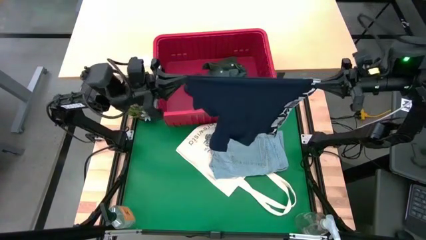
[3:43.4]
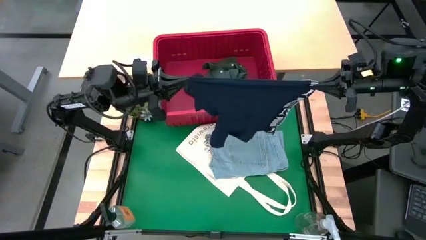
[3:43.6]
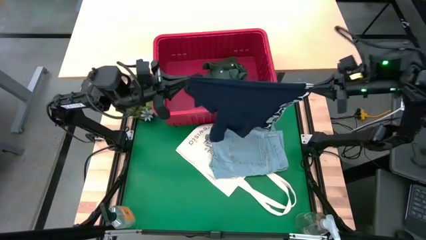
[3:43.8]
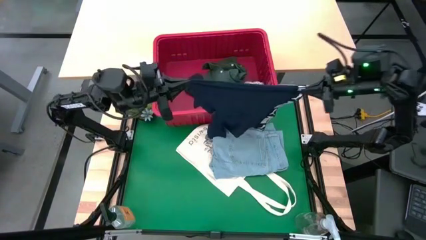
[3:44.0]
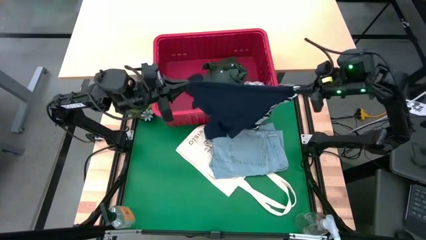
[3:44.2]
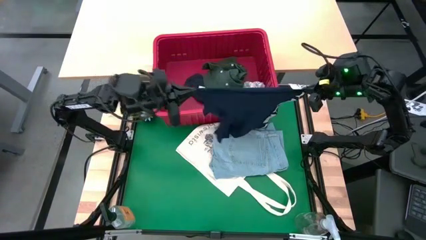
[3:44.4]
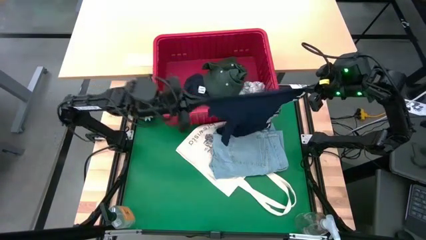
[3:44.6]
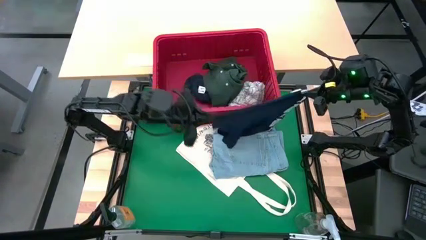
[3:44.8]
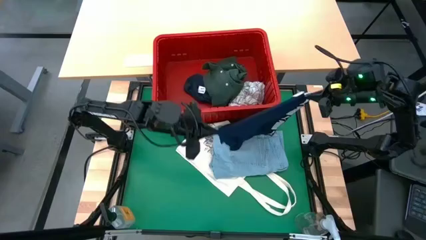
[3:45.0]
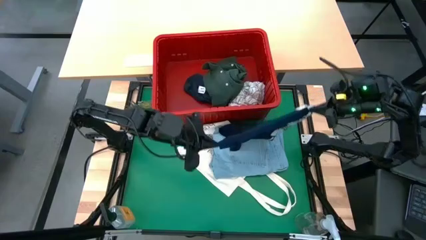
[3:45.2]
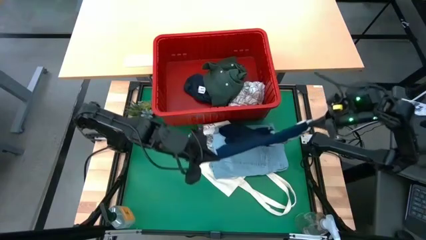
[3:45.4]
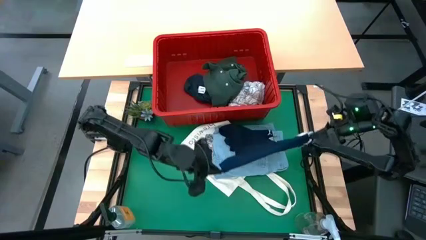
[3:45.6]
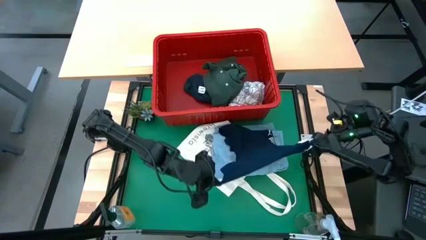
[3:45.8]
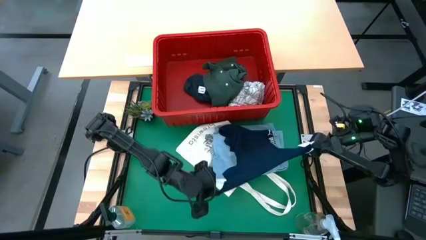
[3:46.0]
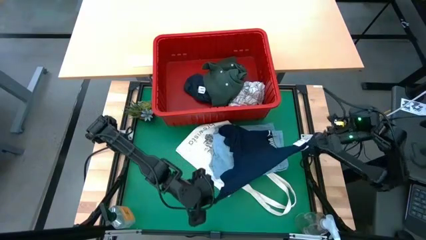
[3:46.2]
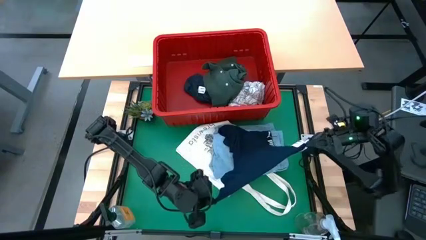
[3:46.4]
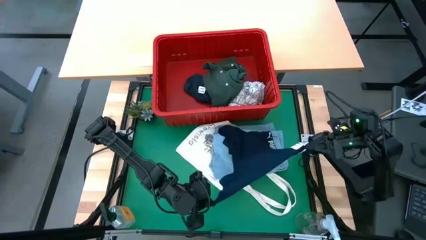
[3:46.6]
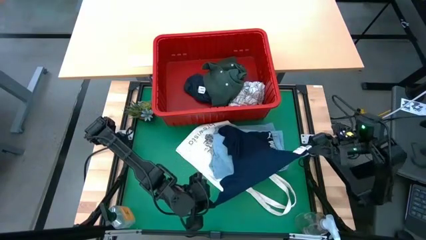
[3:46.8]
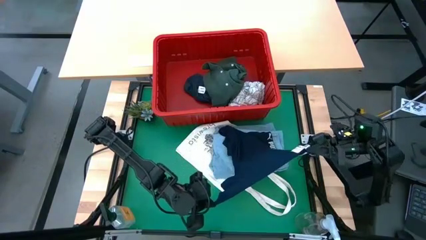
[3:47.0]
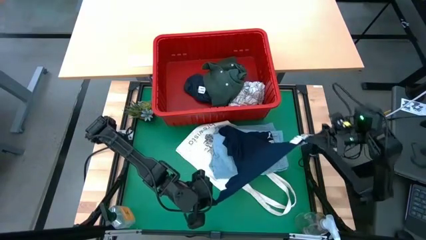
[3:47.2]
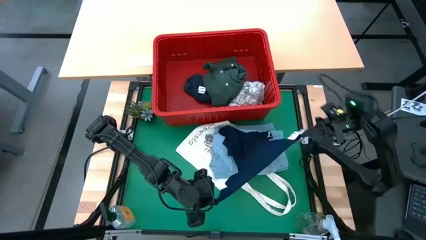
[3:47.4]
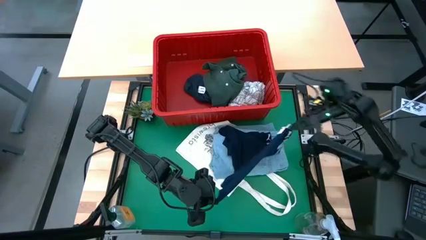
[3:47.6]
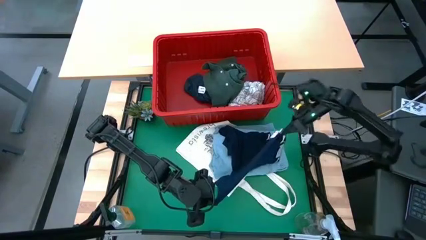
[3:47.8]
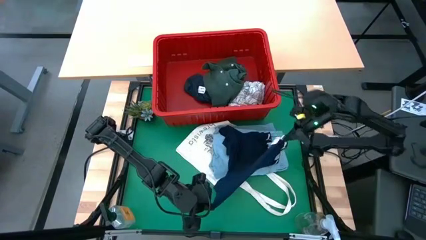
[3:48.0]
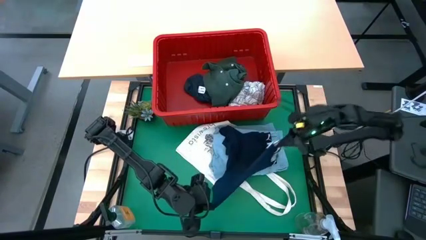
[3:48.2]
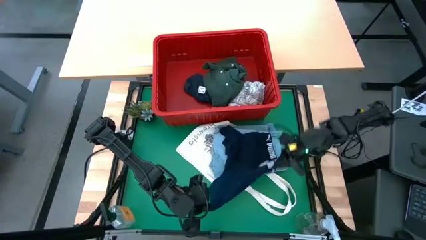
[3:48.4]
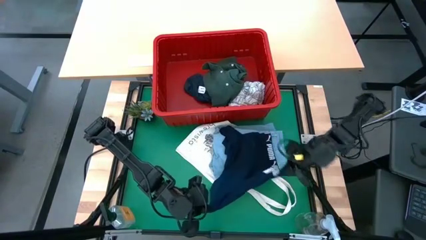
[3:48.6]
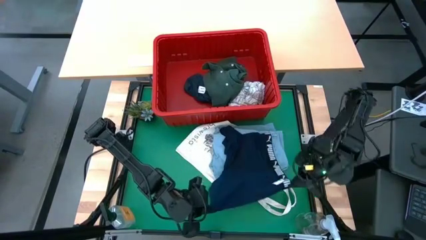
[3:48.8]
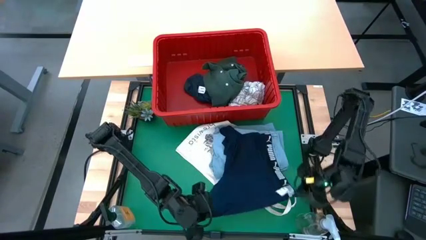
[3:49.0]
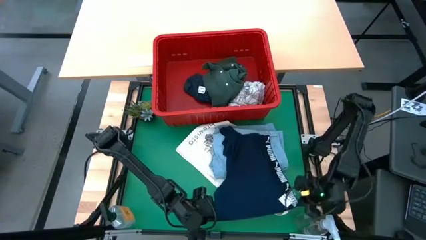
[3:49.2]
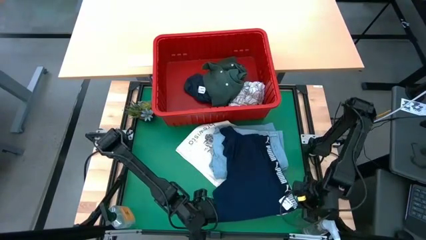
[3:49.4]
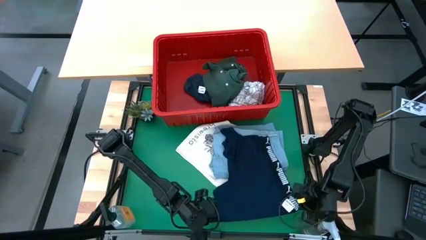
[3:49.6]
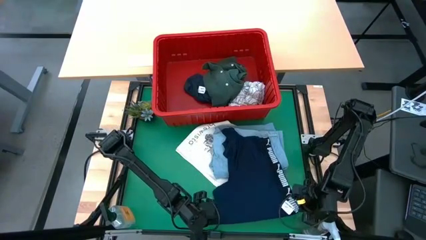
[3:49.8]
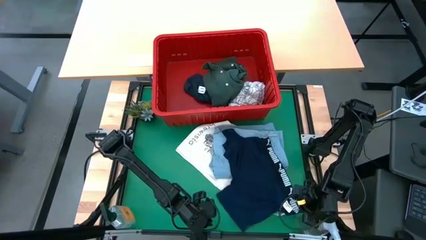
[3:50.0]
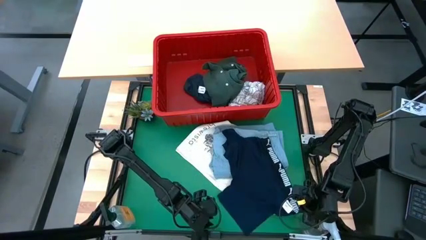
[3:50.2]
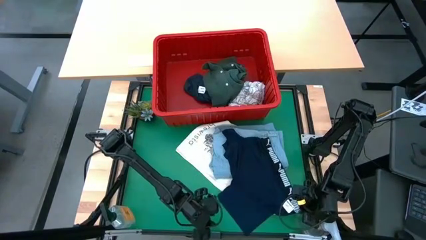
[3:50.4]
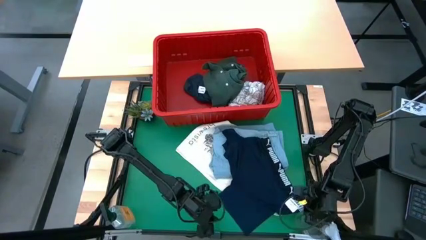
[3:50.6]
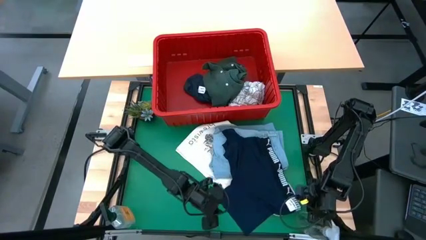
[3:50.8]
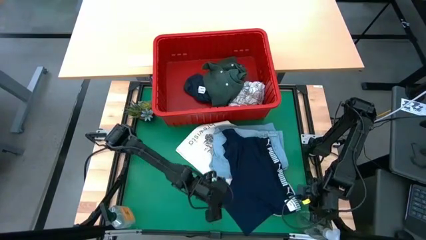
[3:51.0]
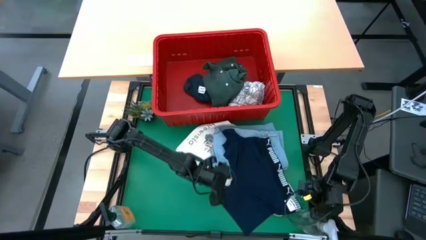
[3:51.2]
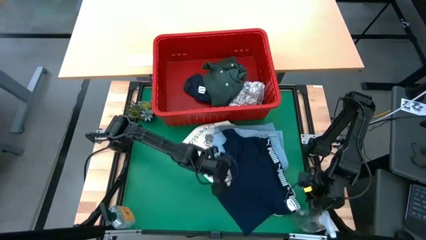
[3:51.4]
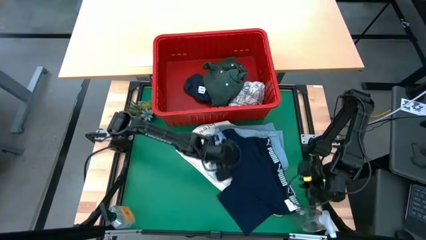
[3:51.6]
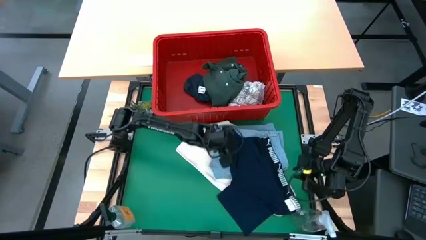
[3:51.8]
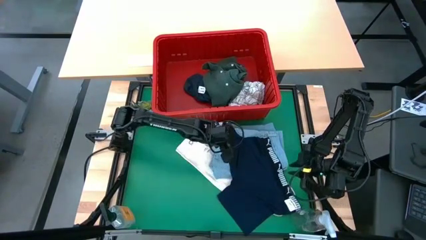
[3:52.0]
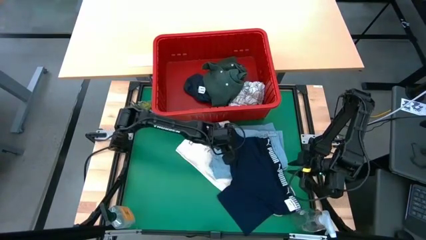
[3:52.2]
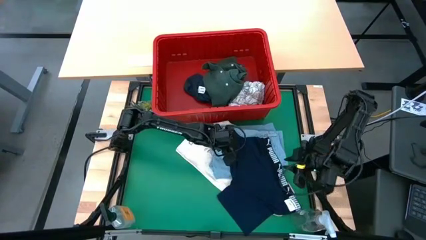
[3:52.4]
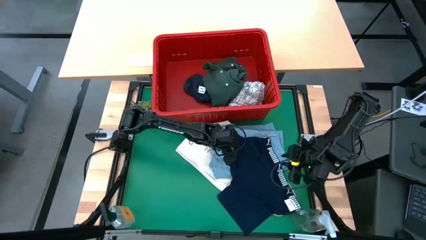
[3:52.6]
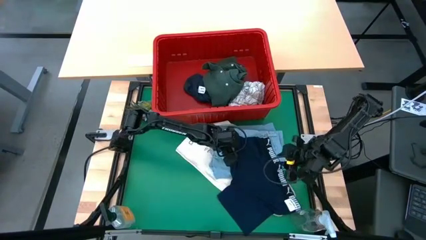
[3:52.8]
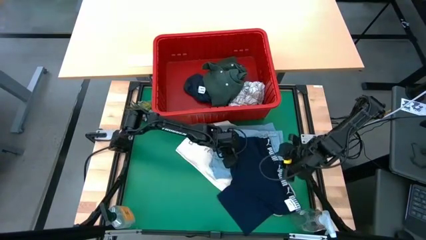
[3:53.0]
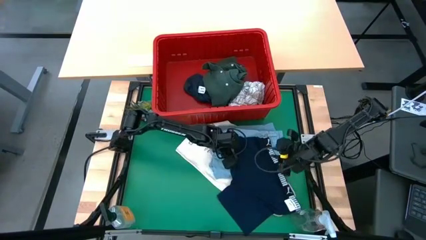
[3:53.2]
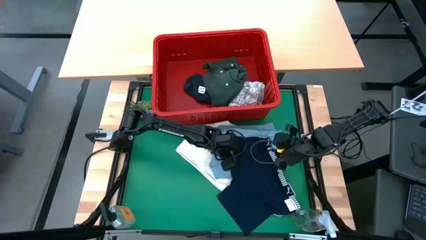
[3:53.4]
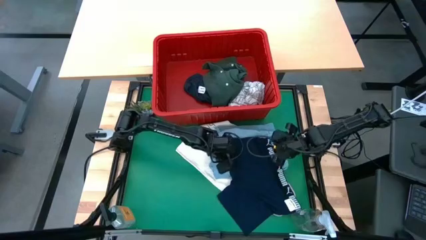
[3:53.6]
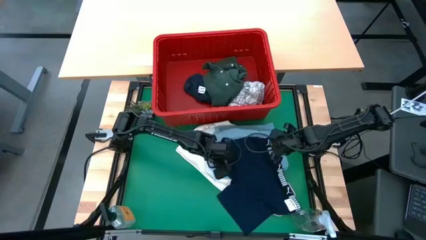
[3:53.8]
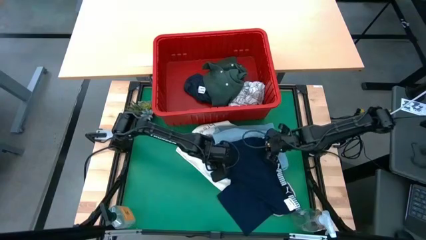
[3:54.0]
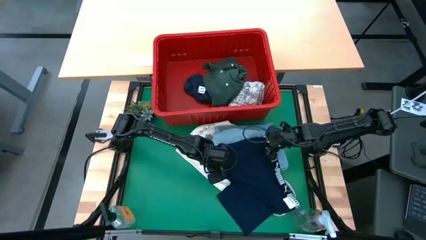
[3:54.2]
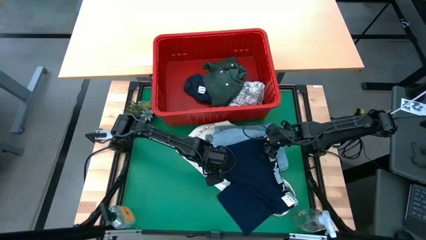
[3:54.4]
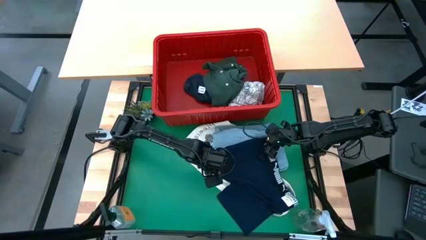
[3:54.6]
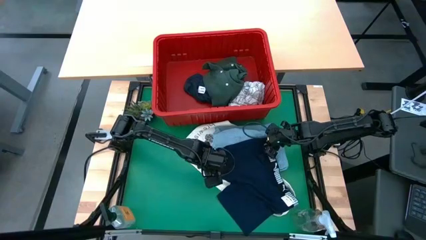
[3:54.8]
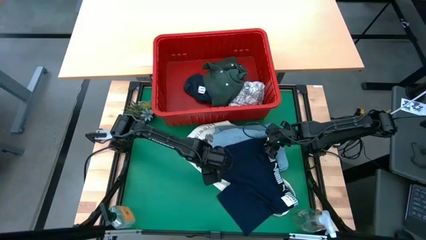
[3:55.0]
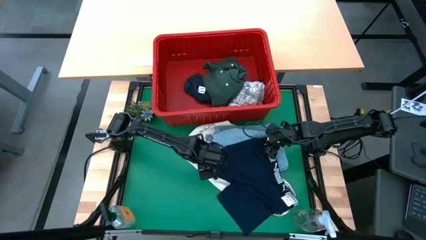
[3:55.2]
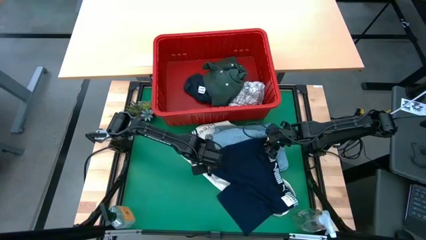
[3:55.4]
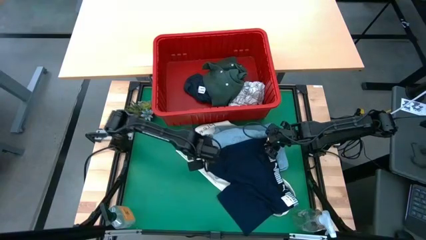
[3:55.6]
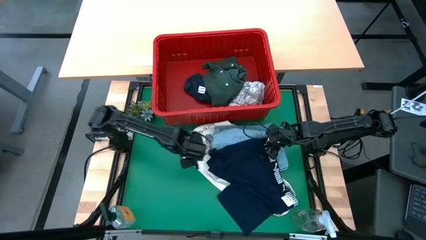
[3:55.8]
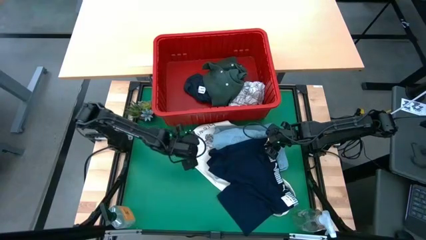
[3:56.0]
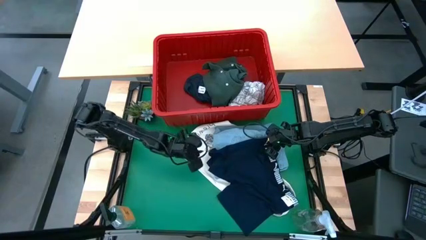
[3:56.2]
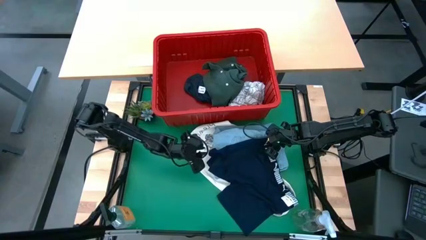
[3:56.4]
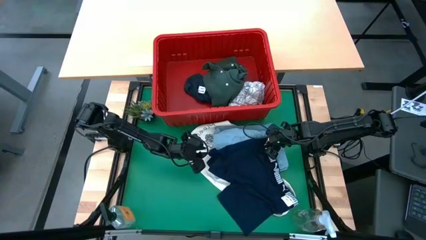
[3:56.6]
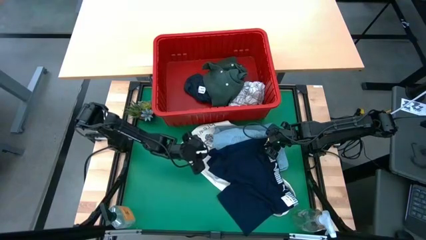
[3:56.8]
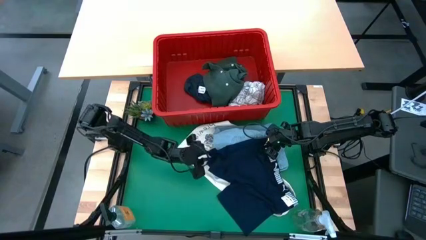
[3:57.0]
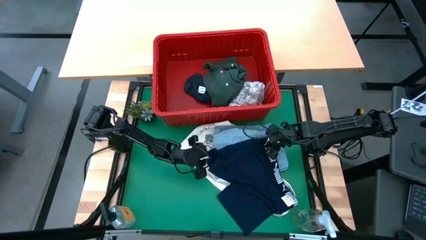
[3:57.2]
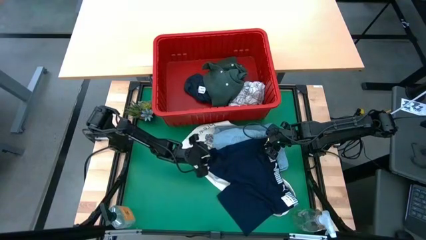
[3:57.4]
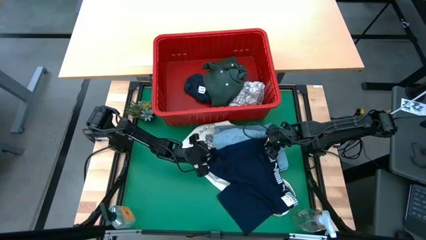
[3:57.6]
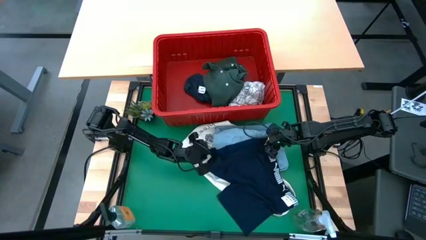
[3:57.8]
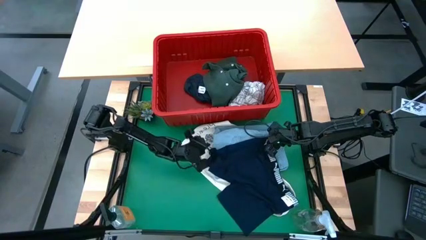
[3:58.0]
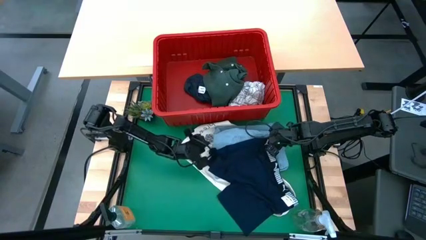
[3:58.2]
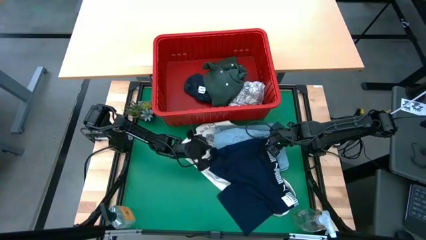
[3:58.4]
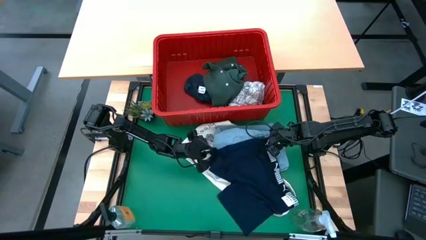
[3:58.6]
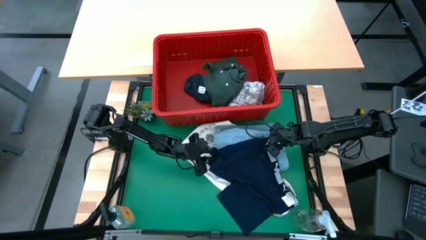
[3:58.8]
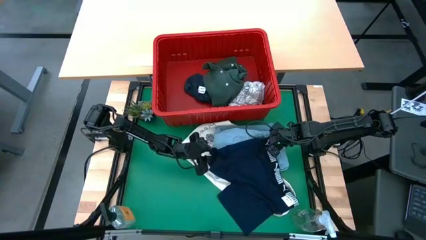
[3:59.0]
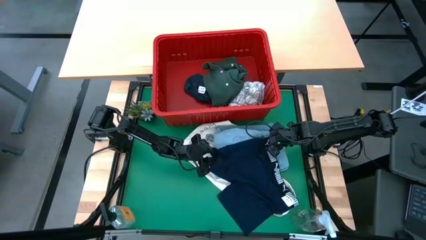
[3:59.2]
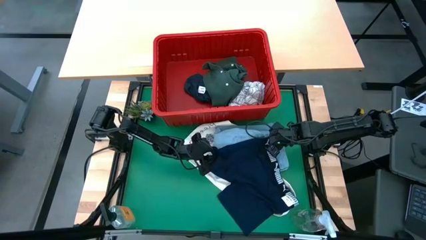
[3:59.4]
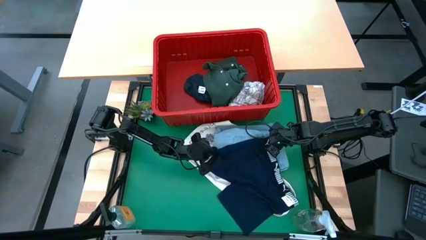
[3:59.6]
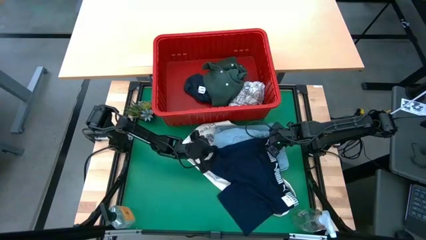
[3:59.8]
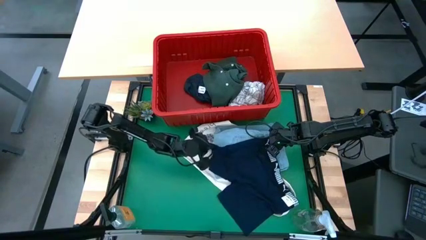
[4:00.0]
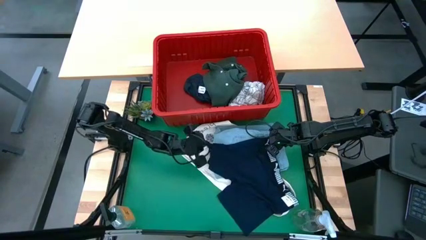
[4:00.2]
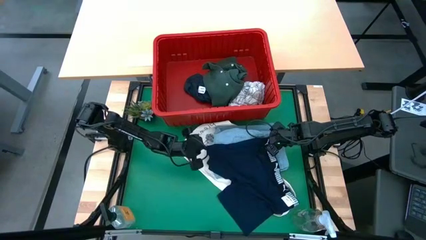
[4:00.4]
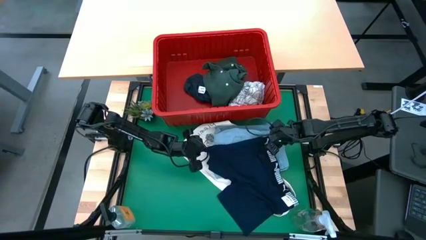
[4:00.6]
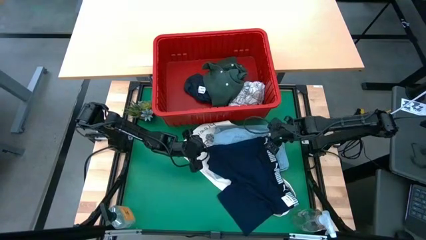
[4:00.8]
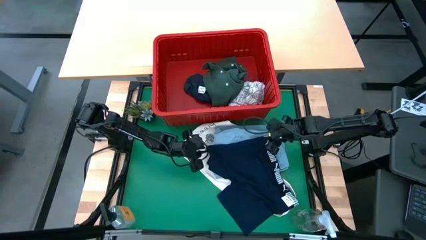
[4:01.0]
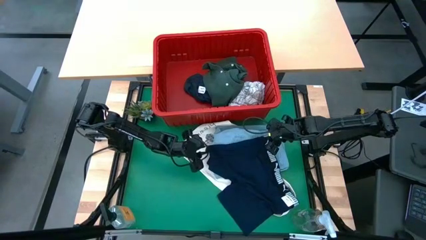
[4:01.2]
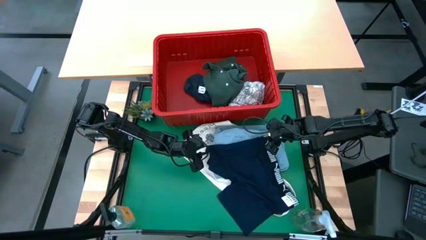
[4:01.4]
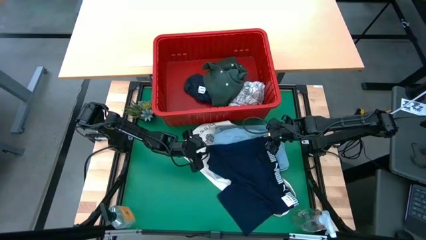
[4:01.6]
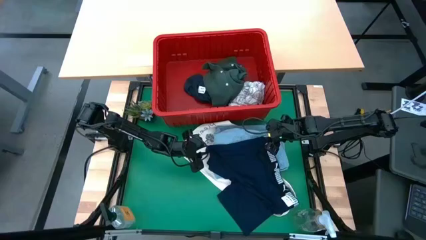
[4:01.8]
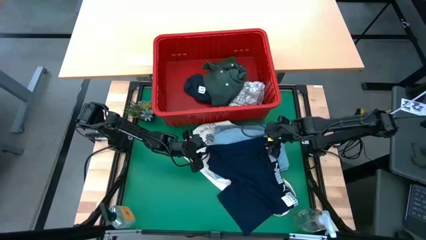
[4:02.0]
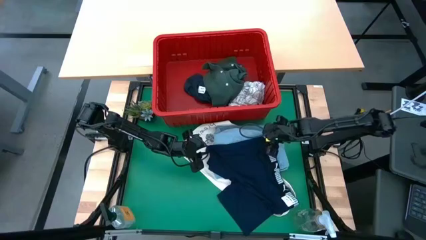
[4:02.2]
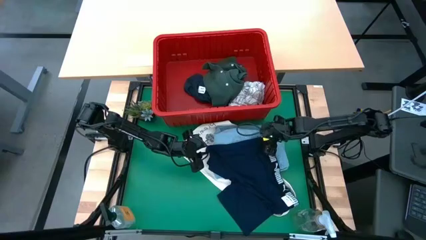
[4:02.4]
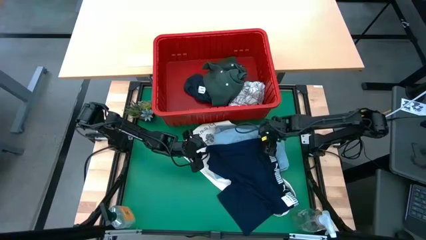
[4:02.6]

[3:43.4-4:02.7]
Task: Fold laundry
Fold the dark blue boxer
